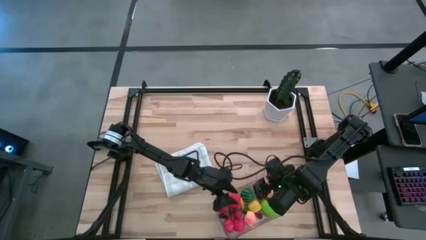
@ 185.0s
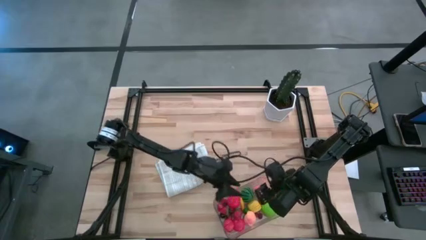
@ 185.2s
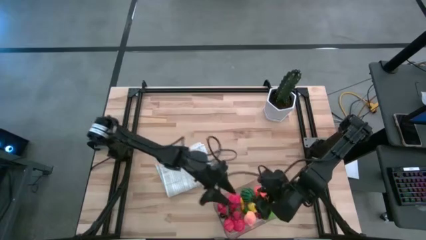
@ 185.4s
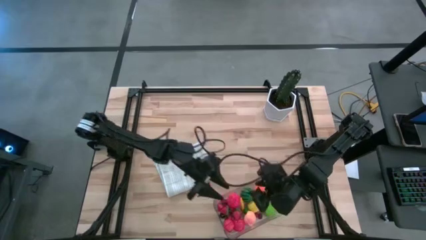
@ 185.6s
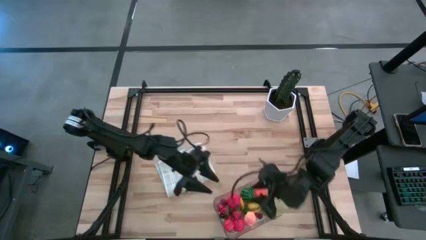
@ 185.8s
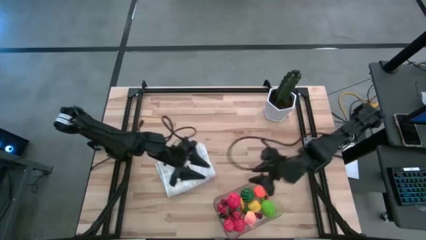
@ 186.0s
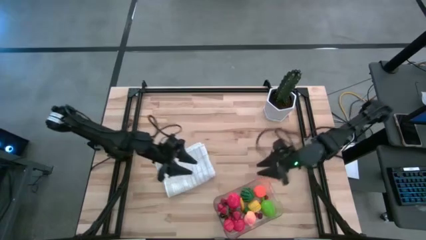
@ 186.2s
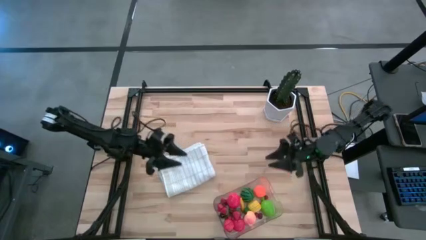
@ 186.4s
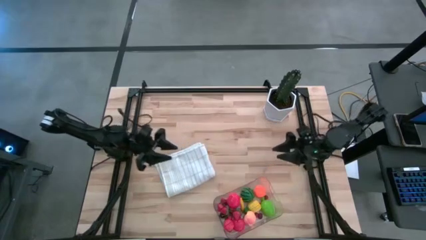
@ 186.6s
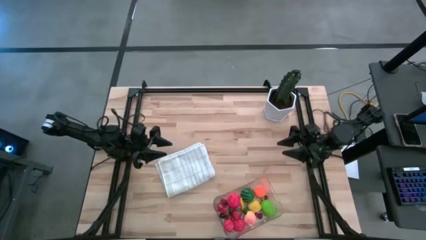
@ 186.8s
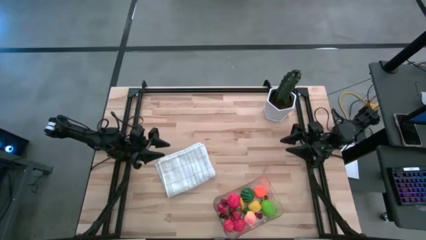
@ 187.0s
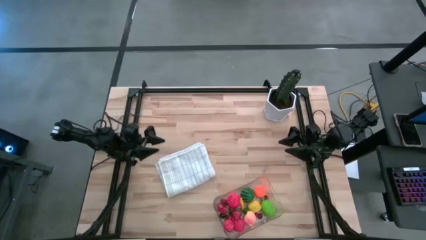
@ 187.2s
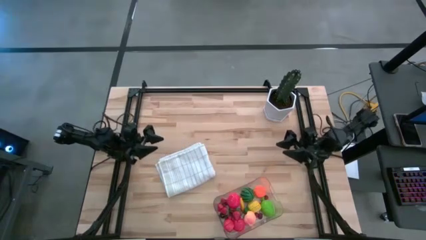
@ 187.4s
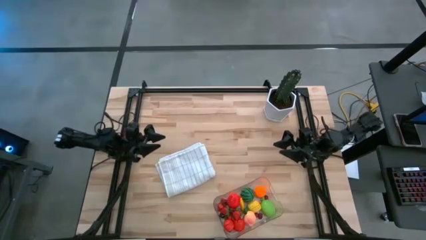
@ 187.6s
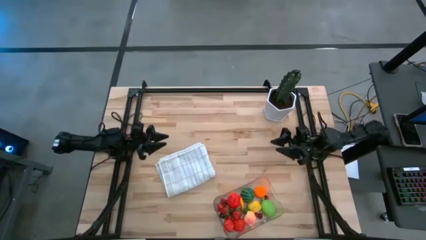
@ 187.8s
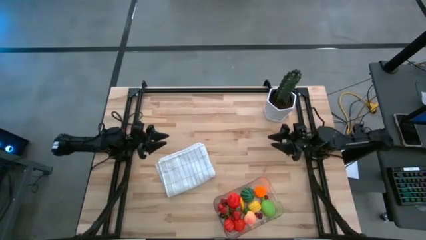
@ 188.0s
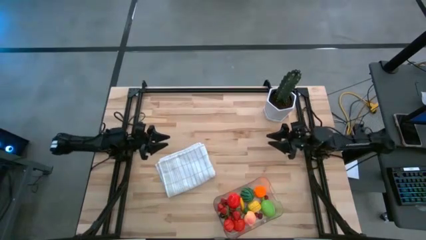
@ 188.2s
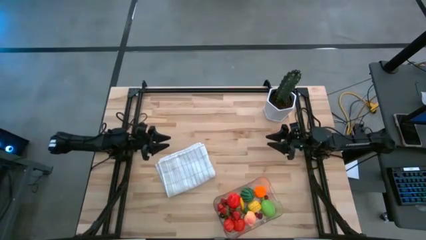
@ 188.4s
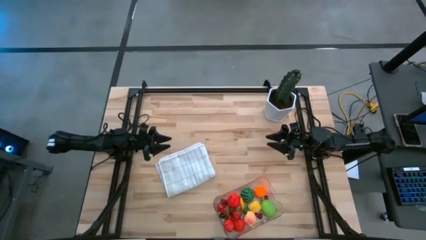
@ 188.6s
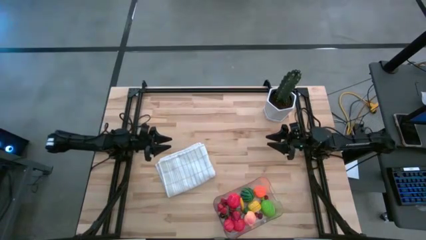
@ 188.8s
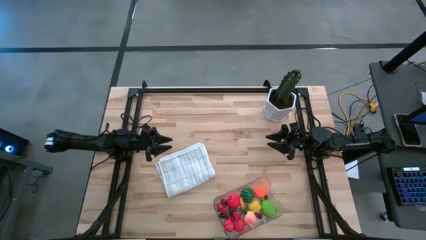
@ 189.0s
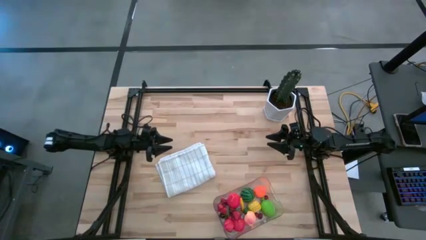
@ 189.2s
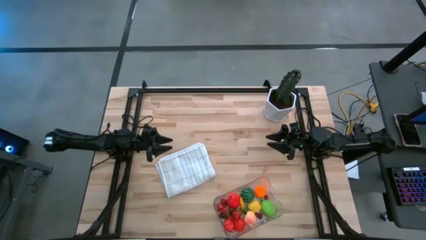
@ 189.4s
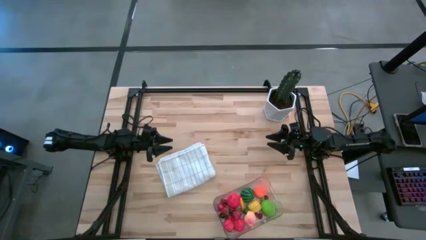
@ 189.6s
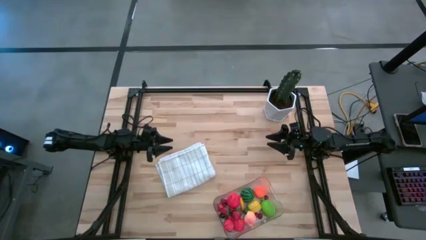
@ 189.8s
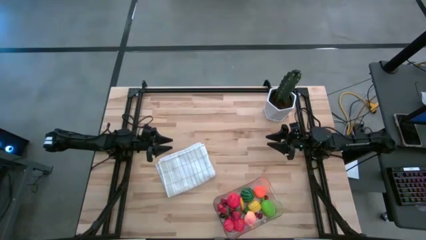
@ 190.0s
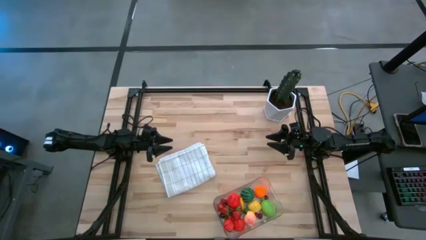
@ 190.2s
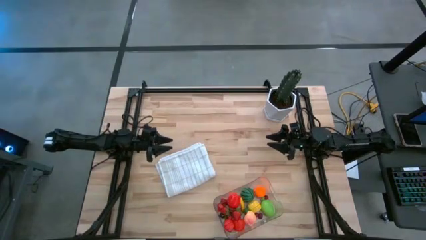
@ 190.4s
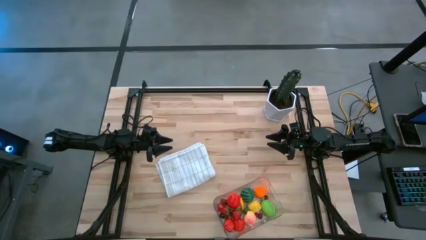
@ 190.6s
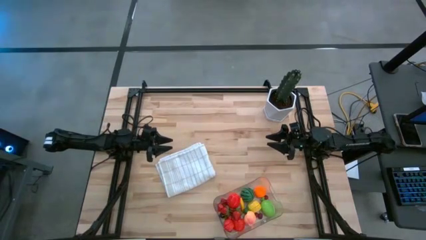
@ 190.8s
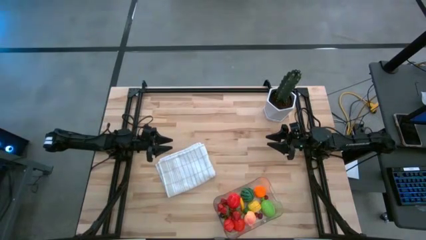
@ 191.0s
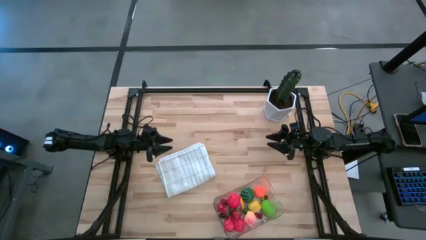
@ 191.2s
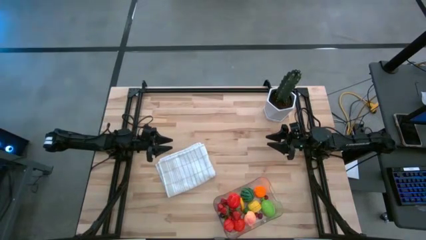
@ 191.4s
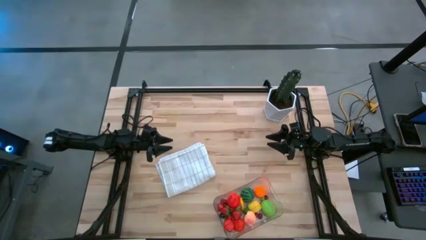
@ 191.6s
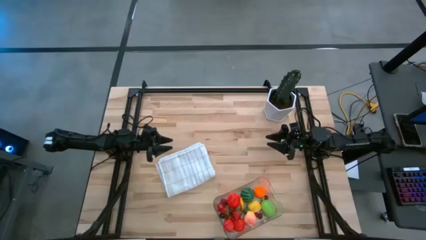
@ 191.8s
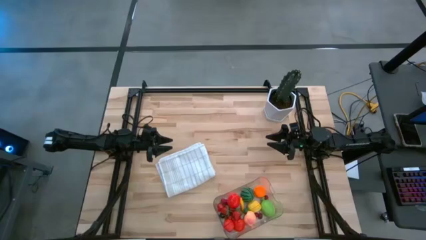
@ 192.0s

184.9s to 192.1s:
Task: Pick and placing Produce into tupperware
Return to Home Position

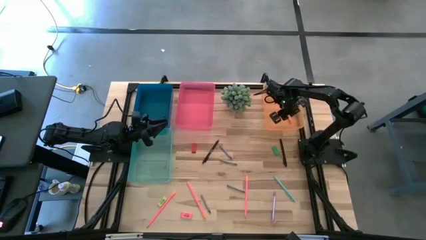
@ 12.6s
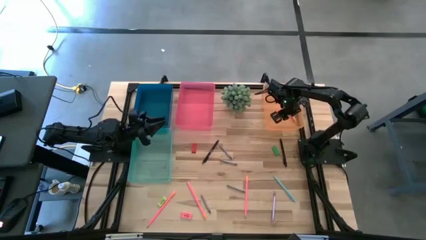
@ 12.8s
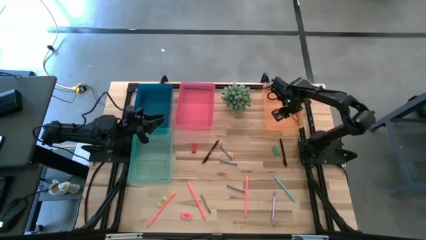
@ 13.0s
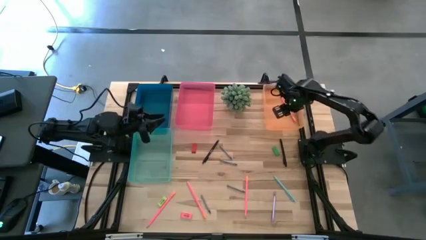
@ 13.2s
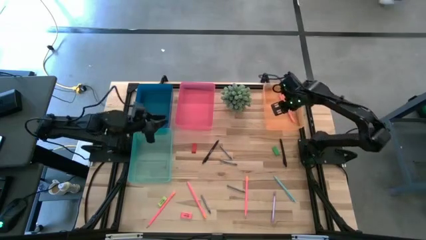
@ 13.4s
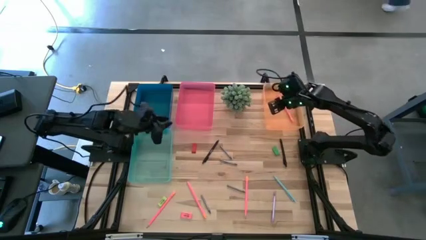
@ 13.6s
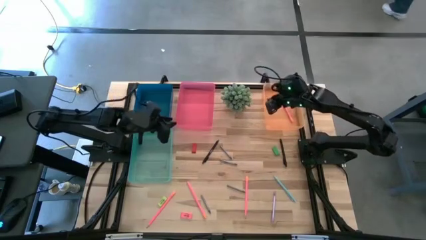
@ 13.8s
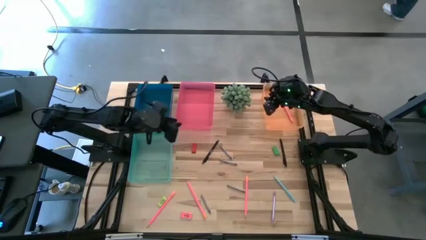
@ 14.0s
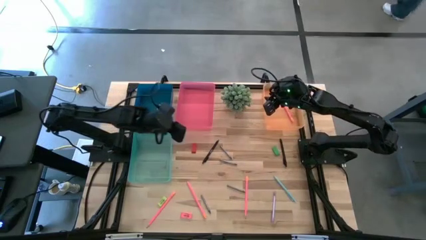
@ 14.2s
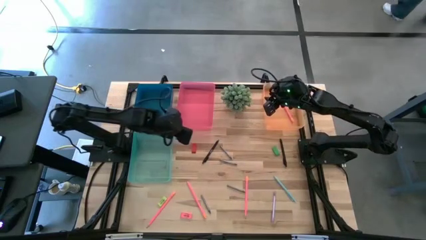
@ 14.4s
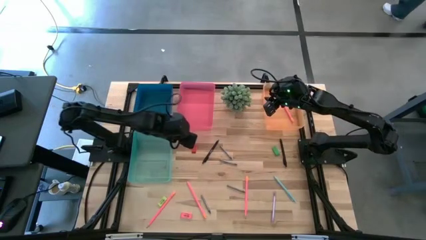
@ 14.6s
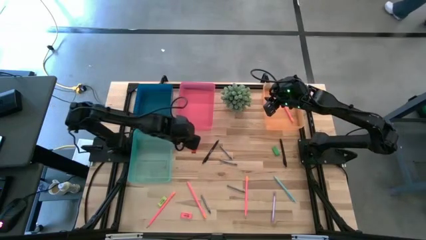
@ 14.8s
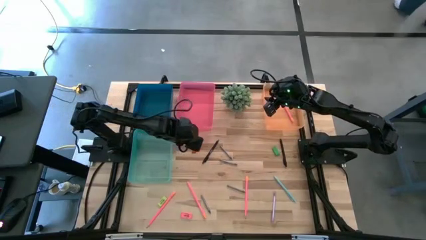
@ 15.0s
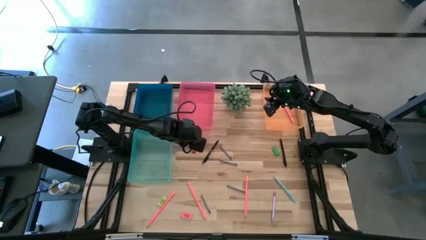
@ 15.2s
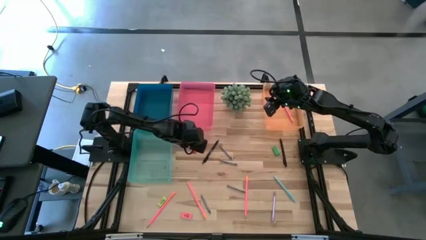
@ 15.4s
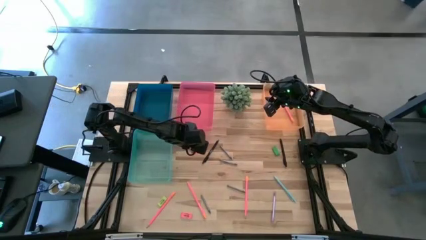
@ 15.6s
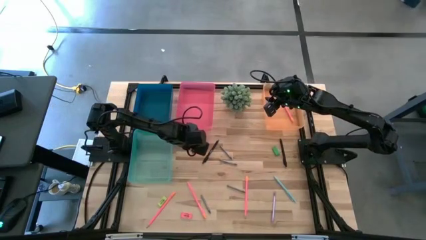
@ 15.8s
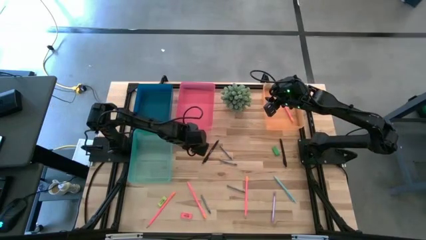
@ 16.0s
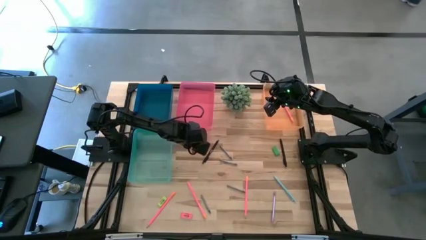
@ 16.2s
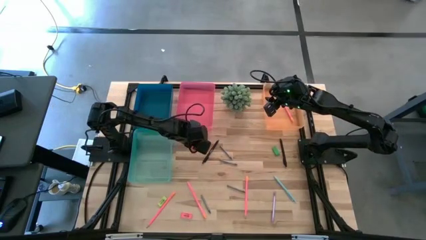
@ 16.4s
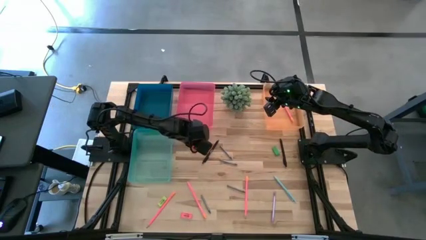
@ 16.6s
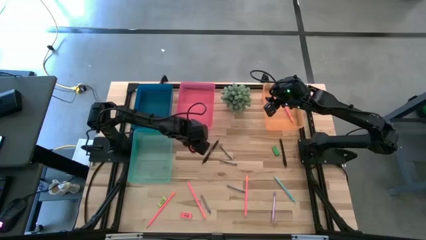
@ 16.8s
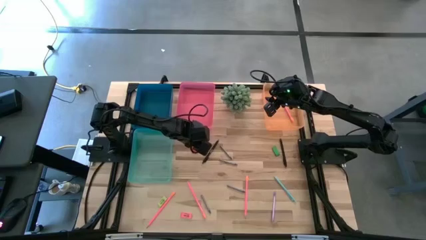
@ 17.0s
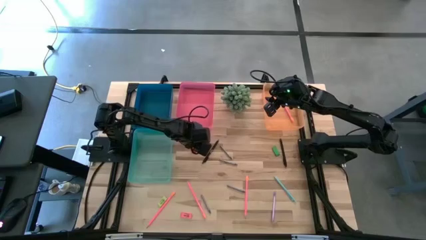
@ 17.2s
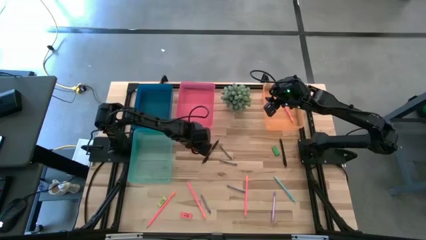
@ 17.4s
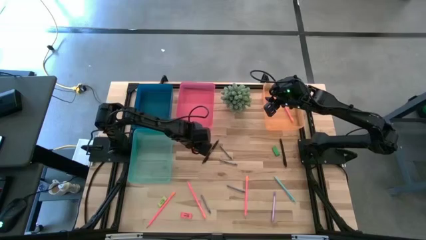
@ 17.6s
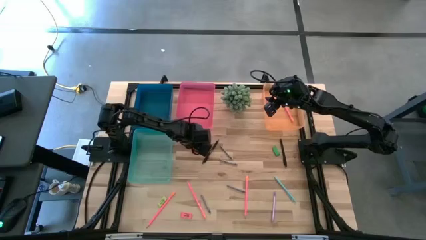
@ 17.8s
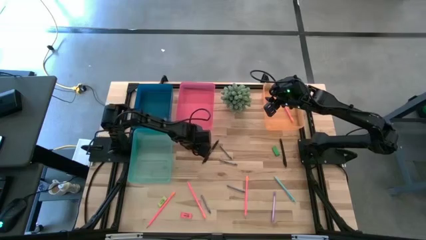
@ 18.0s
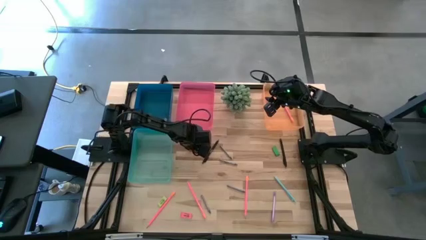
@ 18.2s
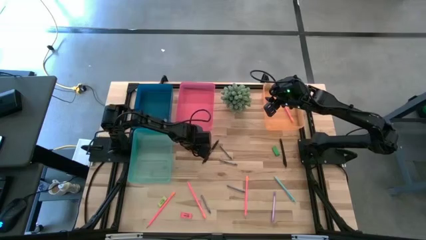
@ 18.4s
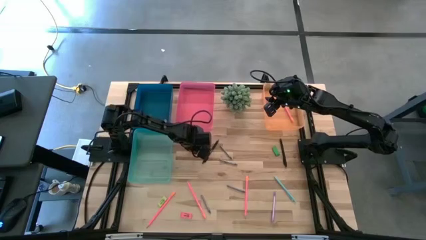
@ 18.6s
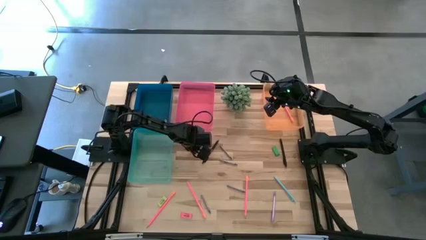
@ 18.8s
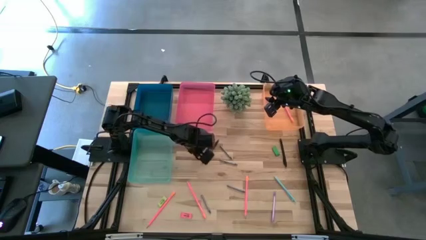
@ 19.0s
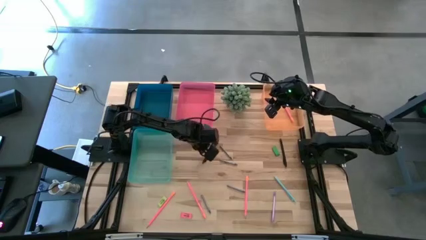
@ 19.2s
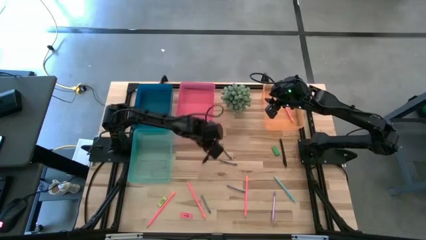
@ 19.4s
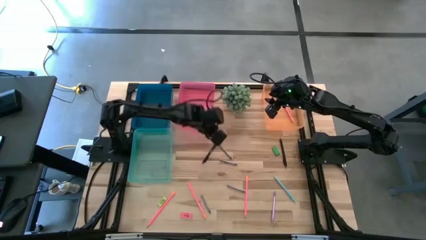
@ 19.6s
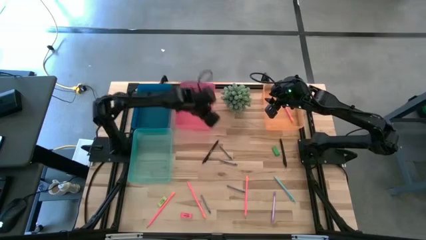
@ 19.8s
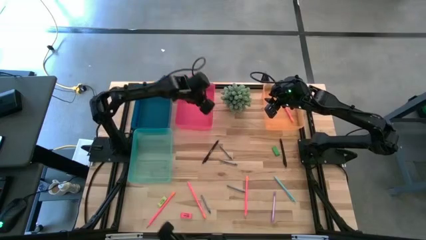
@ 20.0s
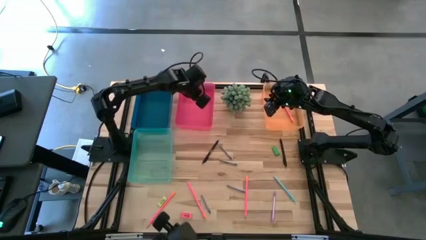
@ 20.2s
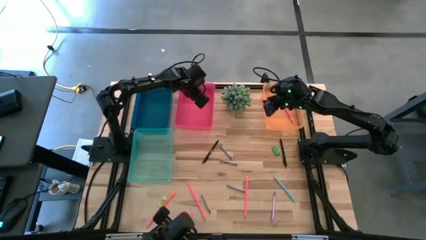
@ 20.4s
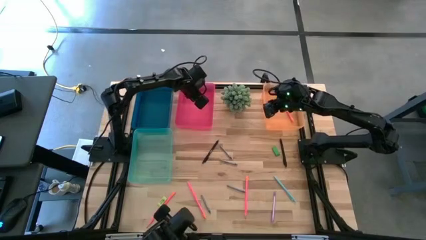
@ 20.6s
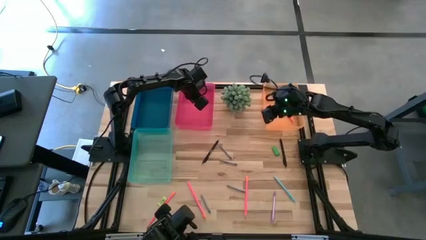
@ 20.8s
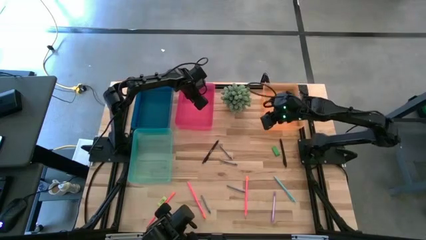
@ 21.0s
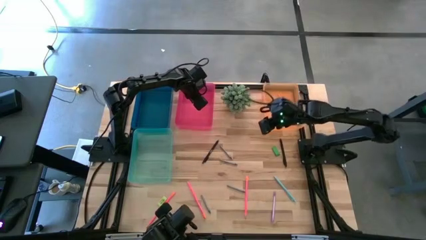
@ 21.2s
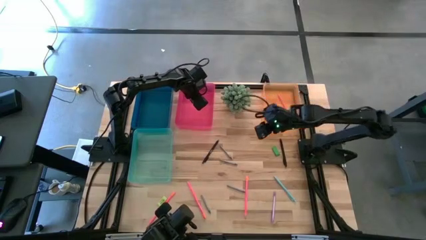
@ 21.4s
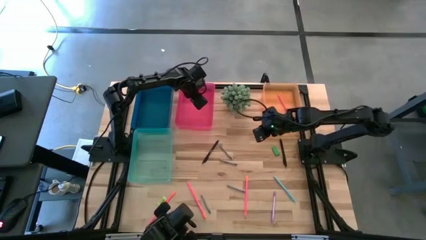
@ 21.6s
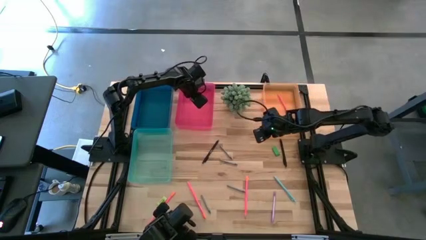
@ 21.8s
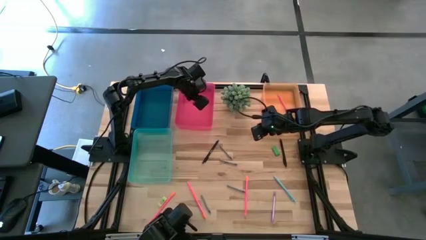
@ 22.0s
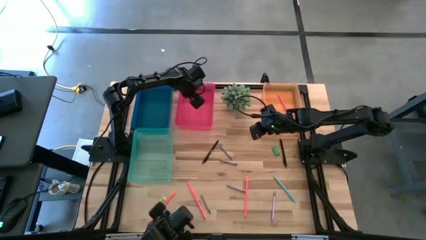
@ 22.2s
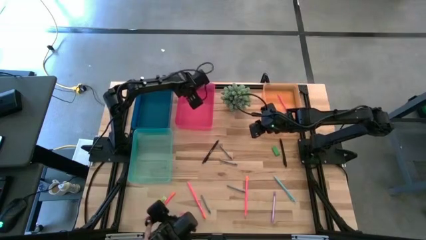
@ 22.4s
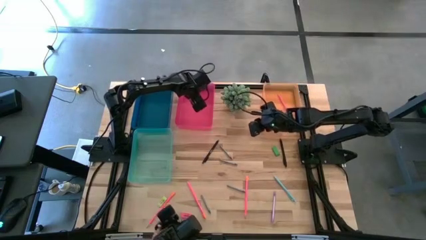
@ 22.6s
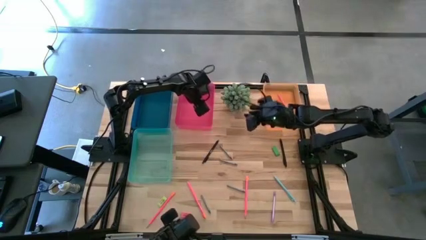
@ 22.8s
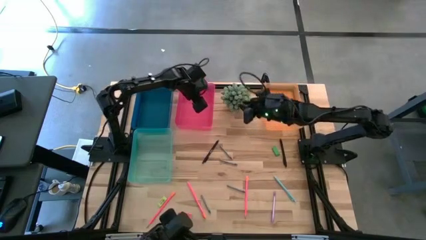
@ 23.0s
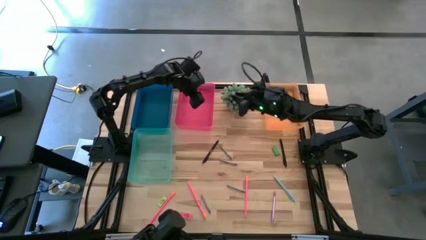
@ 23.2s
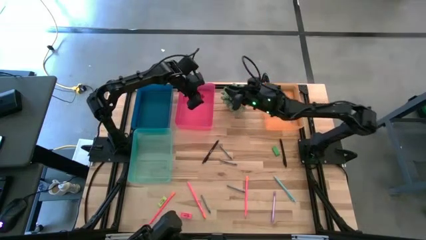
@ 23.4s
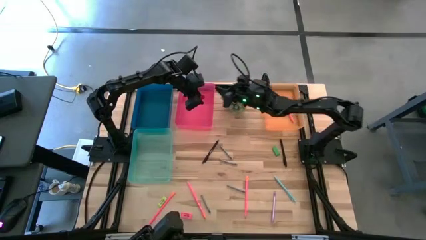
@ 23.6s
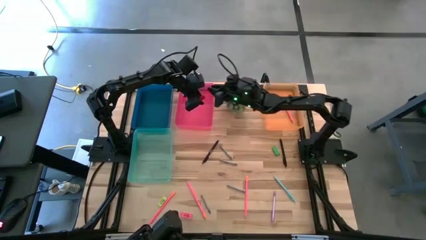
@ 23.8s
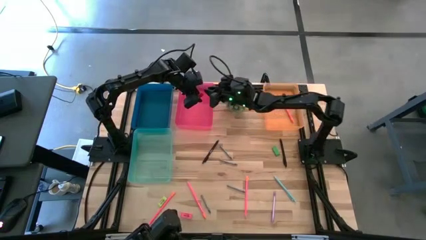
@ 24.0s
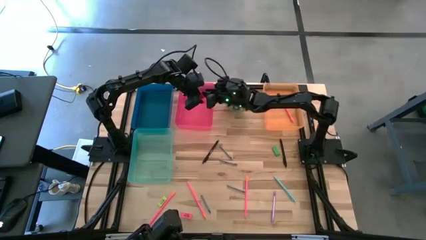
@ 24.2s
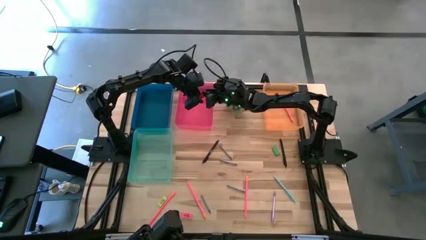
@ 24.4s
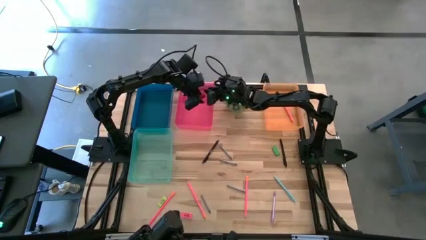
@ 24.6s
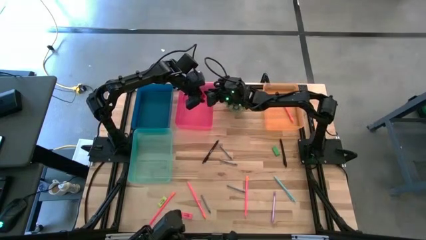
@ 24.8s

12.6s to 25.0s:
Task: Sort crayons/erasers/pens/pencils in bins
Put the orange eraser into the pink bin
